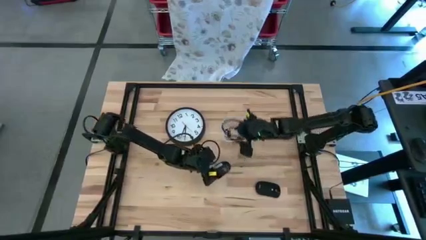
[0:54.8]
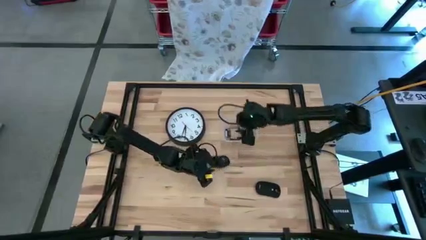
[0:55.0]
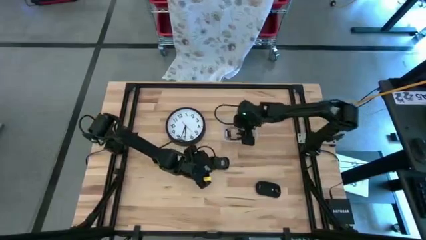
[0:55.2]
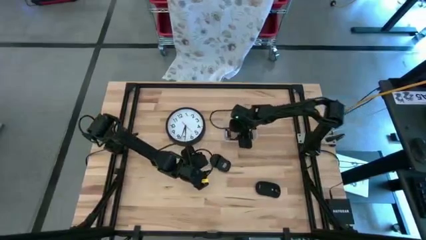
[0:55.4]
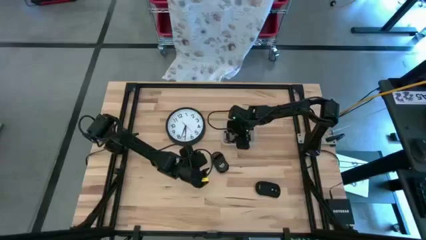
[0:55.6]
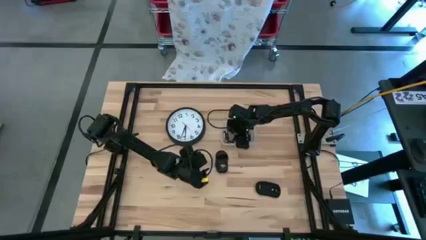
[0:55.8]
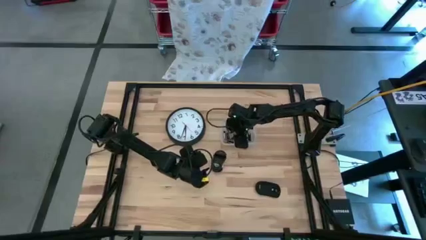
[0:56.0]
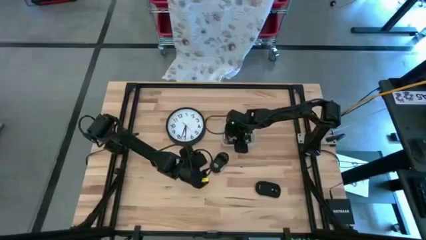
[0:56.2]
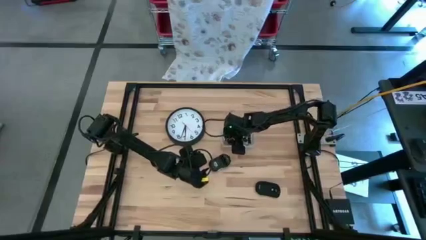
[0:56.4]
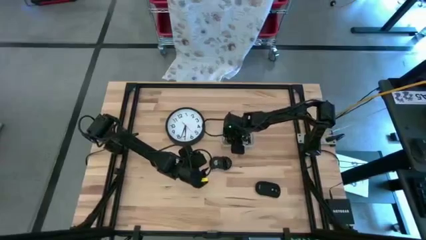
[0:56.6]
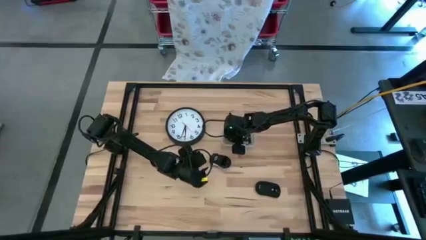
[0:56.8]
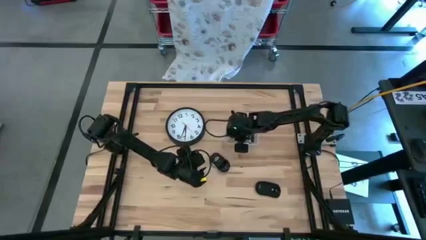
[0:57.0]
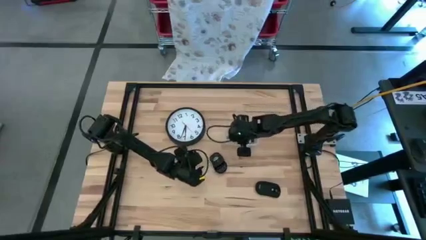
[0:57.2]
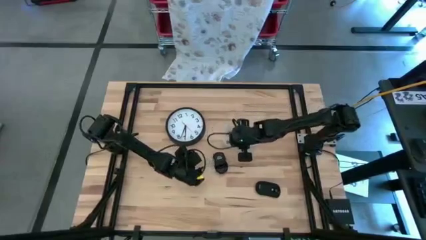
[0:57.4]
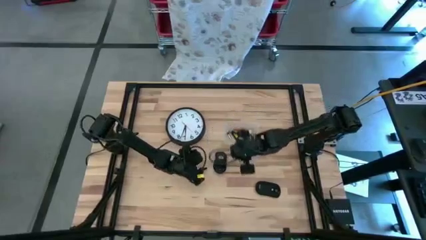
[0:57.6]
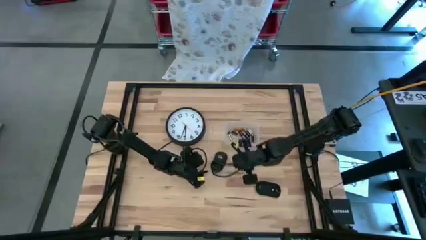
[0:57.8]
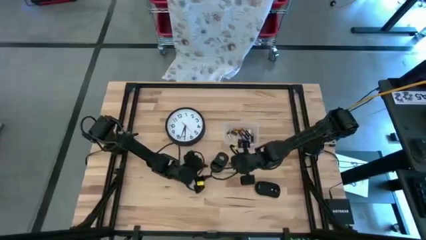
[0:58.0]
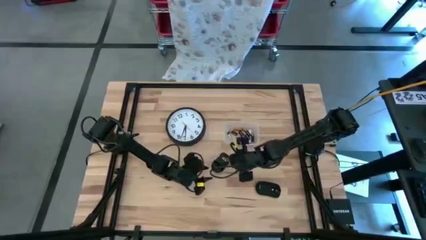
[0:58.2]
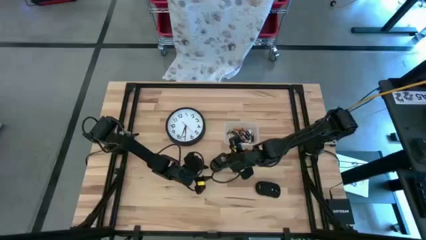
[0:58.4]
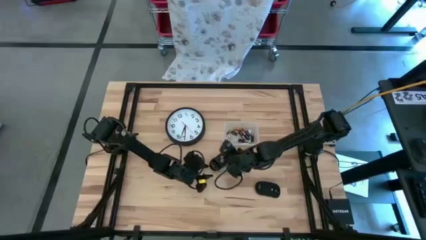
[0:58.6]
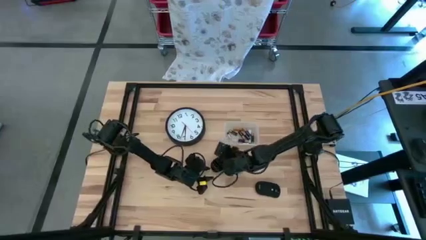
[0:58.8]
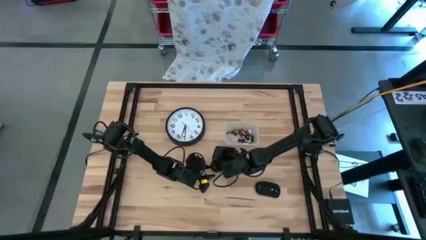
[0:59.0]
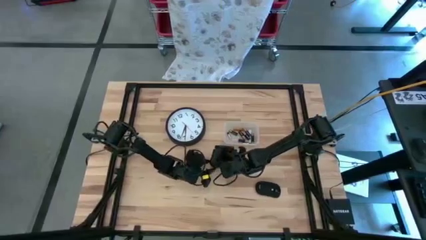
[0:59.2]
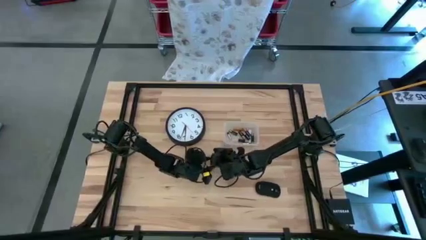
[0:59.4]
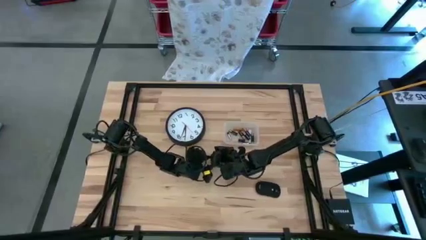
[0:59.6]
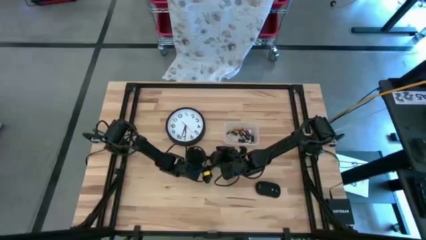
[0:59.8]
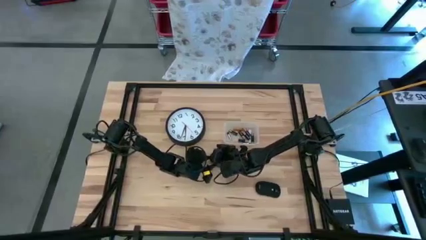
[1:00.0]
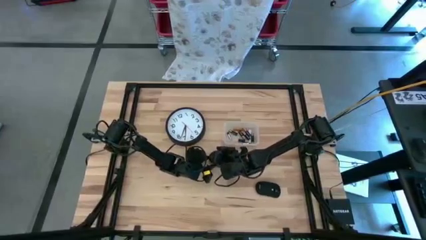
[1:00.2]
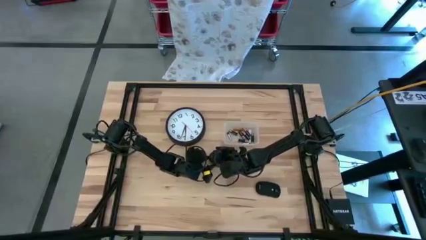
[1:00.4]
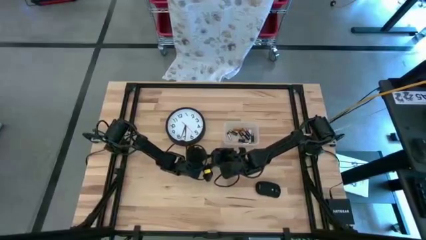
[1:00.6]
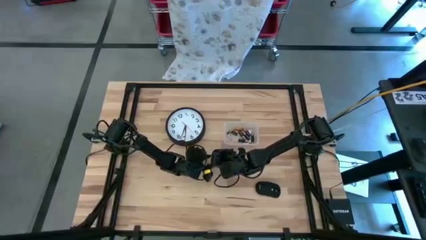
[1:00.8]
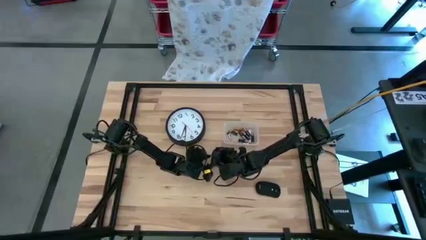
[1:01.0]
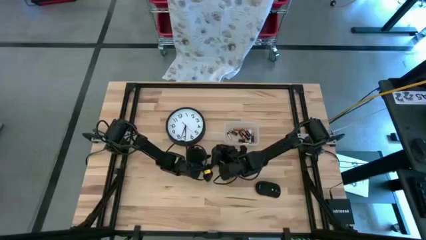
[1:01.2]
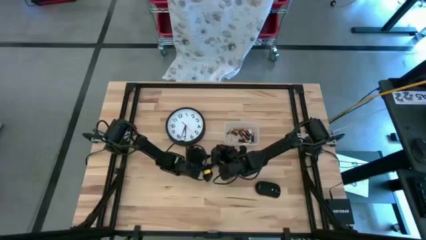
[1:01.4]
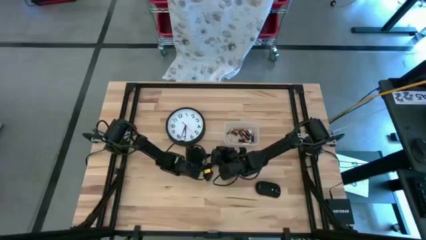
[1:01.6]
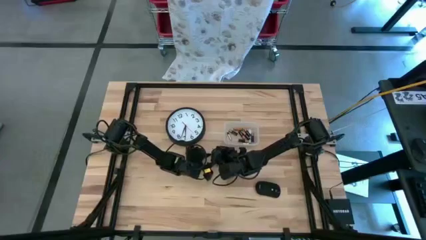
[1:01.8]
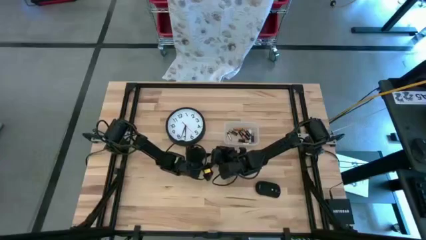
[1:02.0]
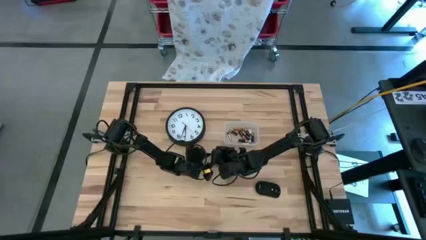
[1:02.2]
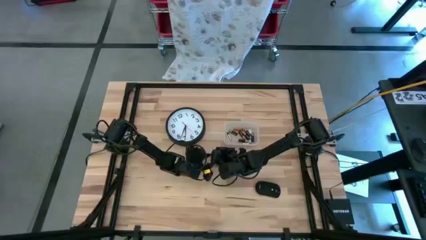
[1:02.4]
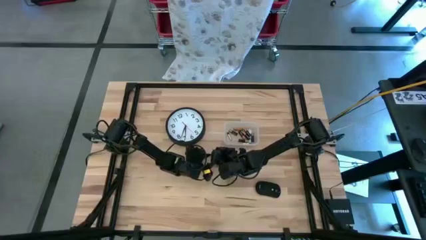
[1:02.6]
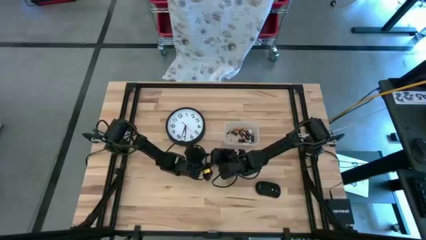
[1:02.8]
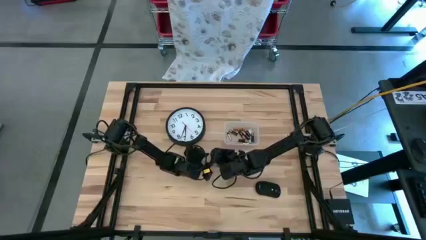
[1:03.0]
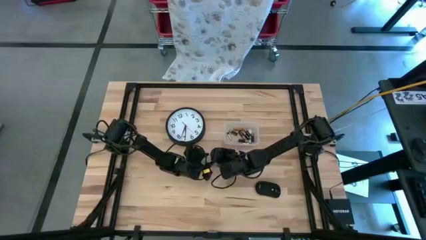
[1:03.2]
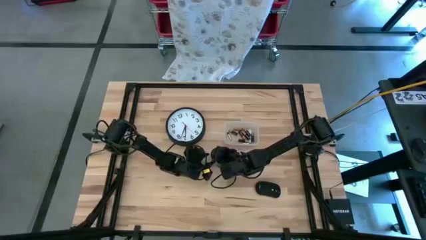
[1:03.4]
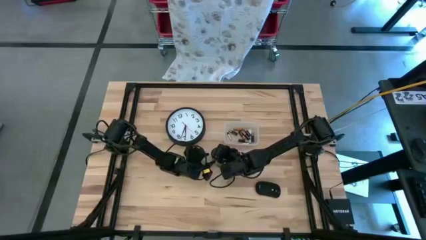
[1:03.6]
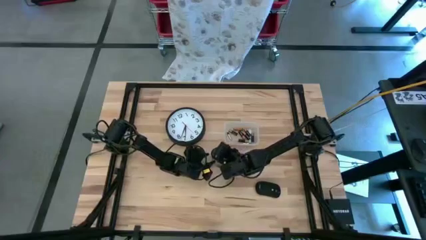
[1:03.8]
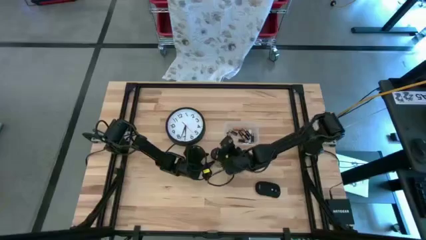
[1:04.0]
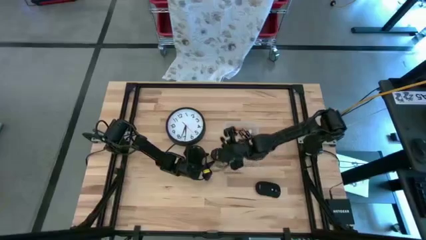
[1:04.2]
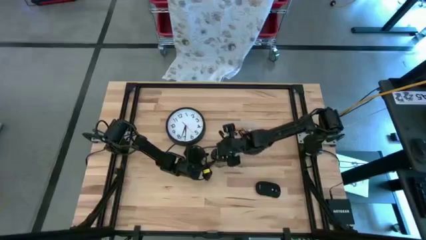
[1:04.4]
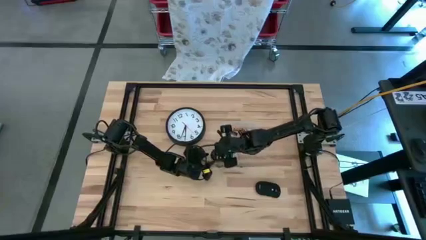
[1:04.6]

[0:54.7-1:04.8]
Task: Insert battery
Insert the black battery into the right computer mouse
